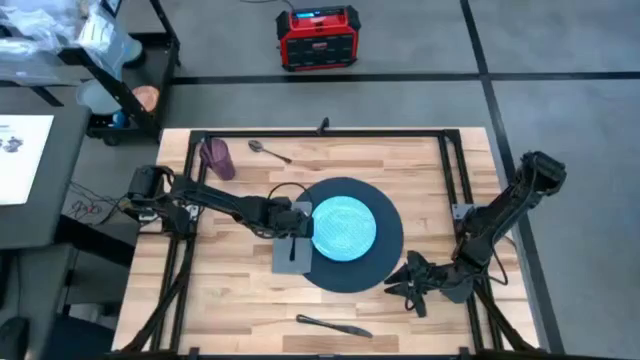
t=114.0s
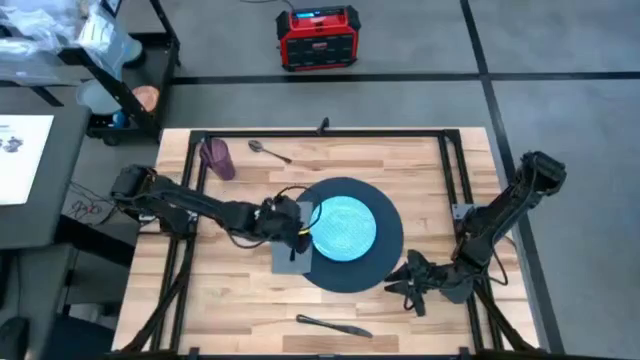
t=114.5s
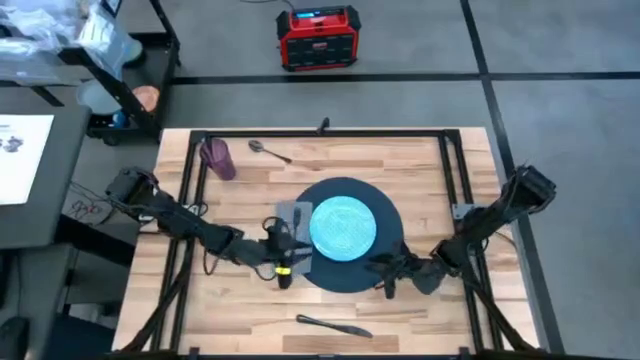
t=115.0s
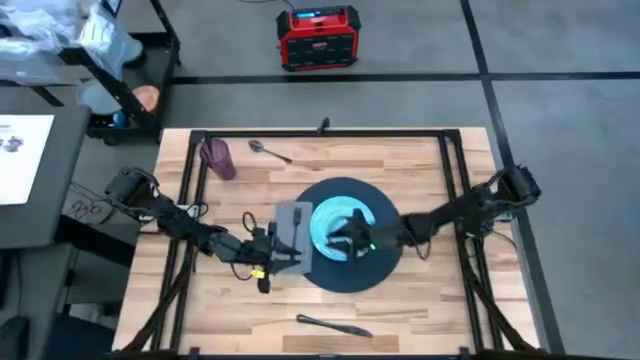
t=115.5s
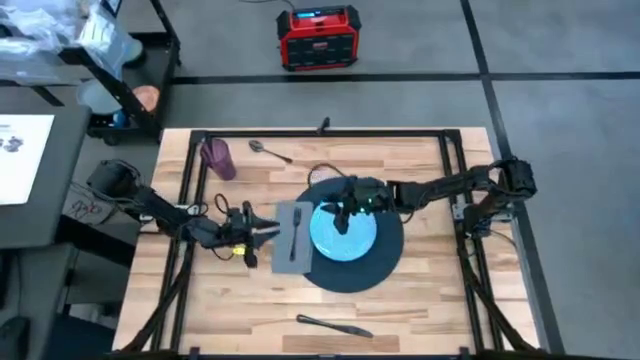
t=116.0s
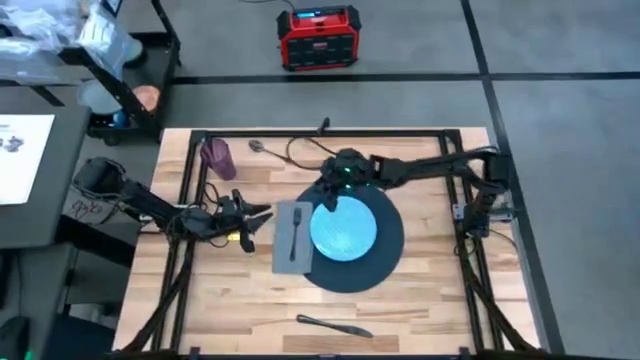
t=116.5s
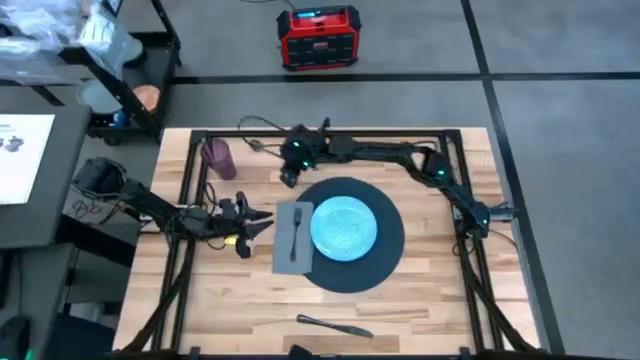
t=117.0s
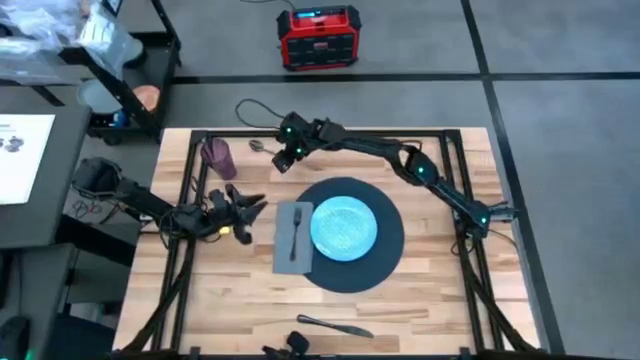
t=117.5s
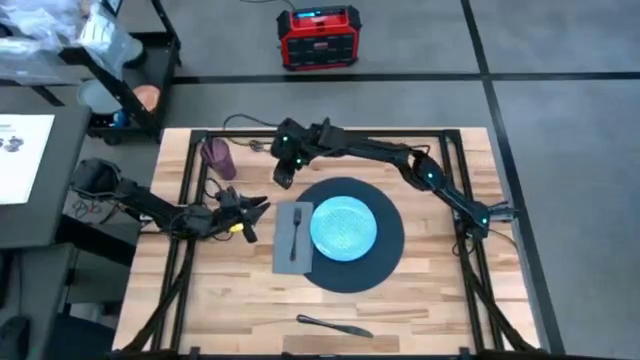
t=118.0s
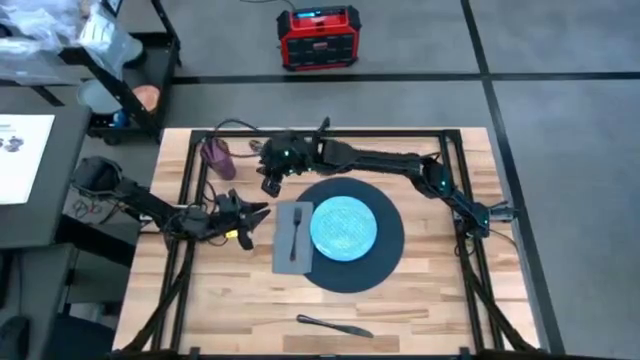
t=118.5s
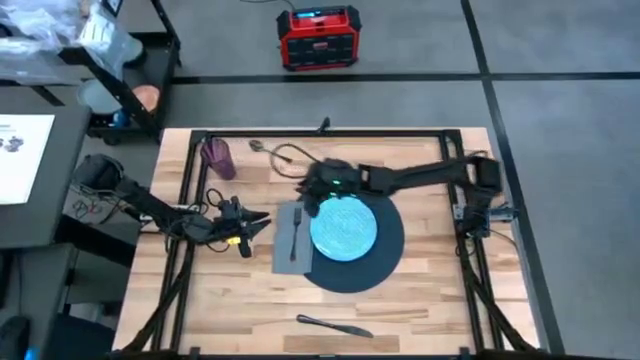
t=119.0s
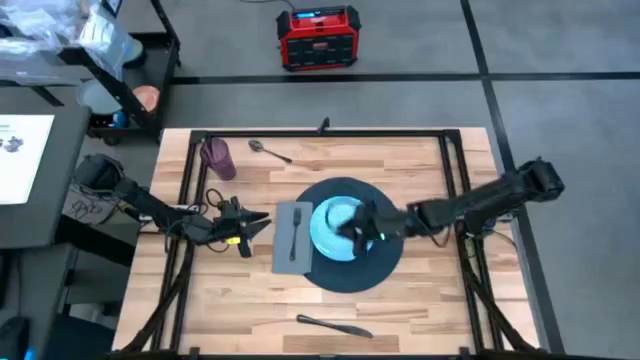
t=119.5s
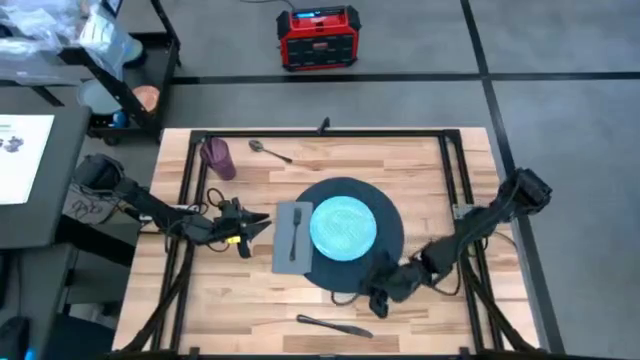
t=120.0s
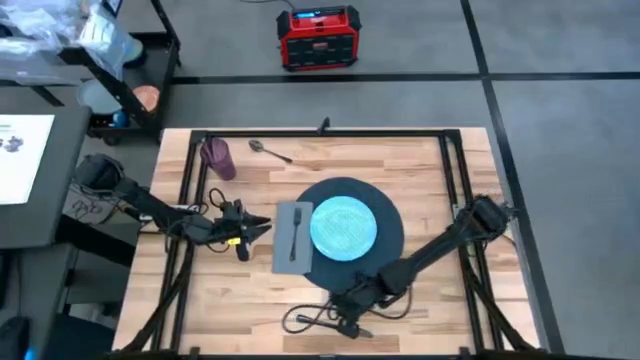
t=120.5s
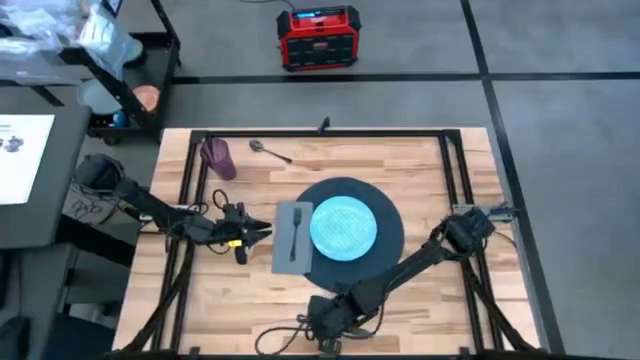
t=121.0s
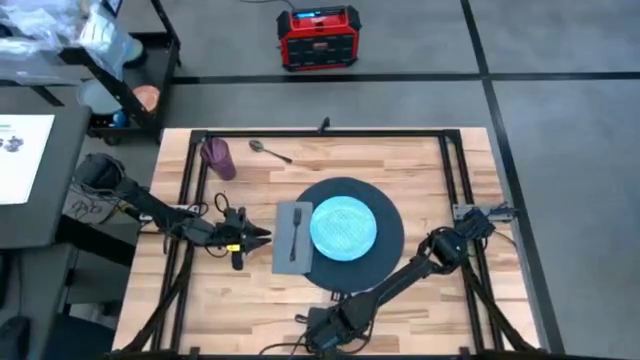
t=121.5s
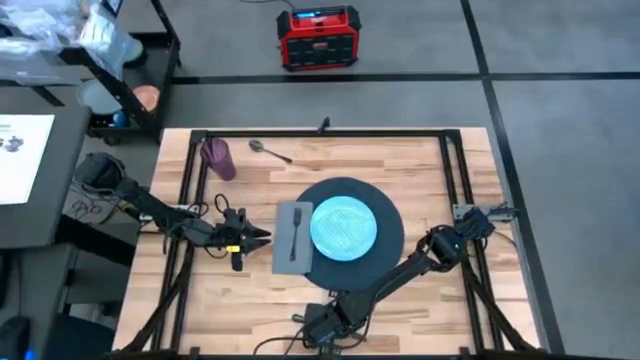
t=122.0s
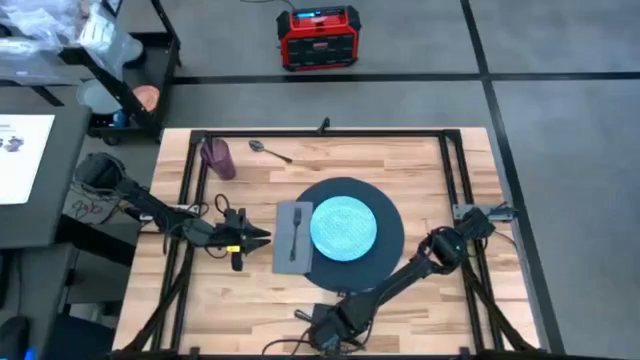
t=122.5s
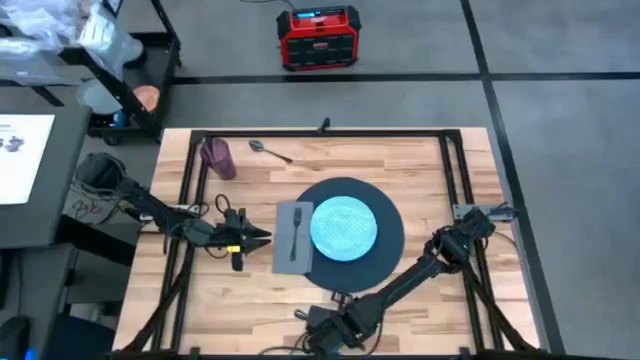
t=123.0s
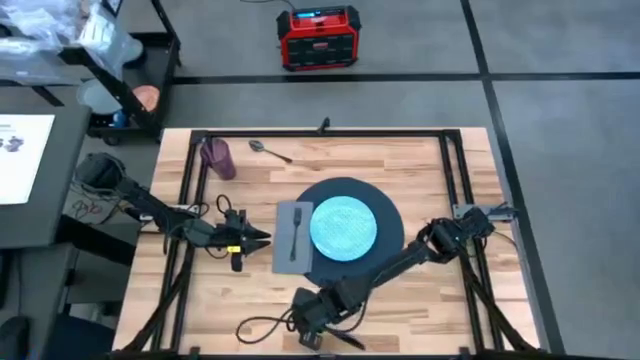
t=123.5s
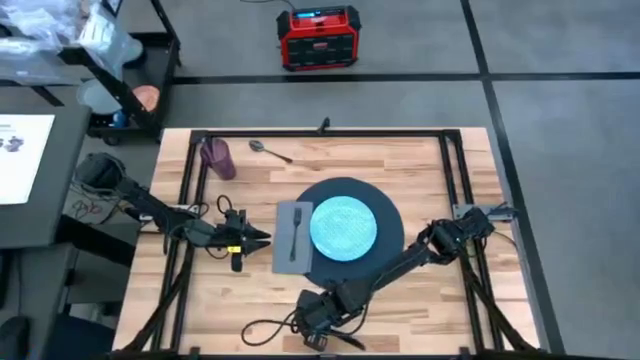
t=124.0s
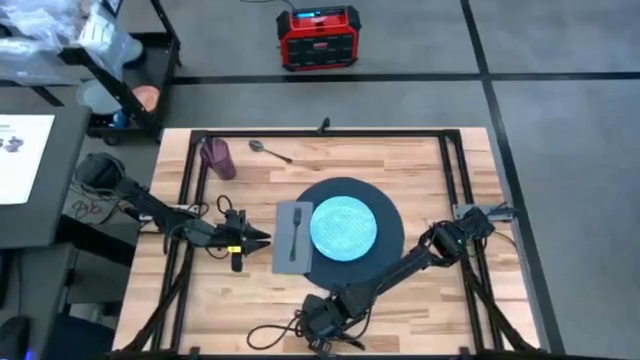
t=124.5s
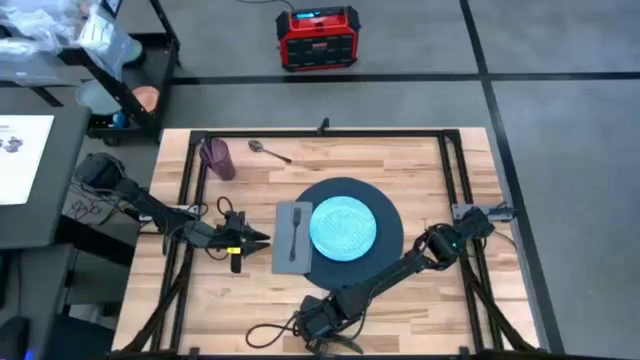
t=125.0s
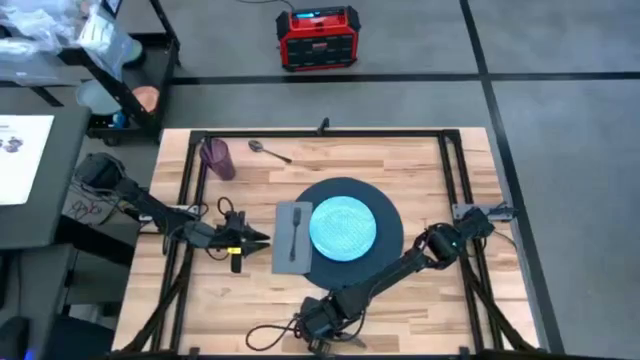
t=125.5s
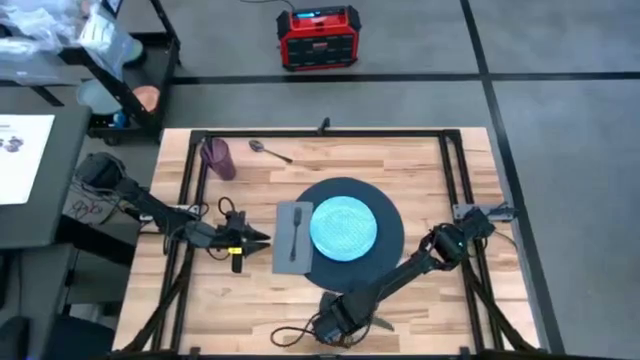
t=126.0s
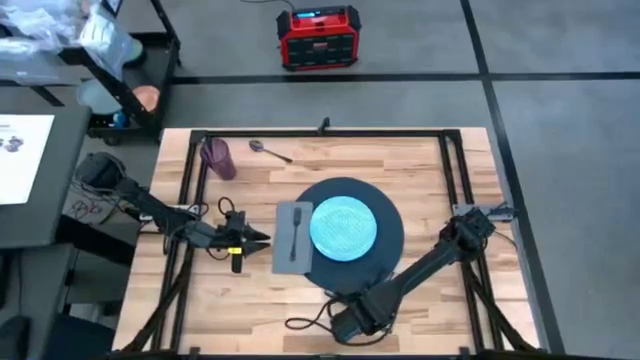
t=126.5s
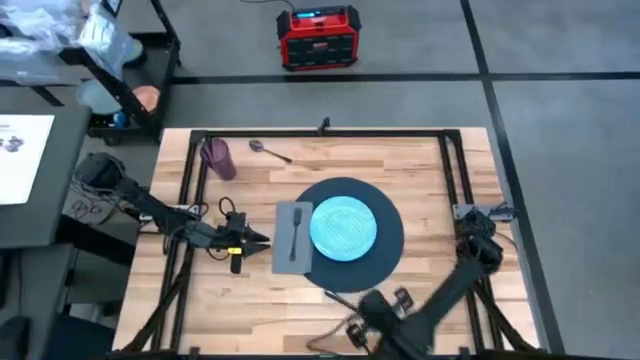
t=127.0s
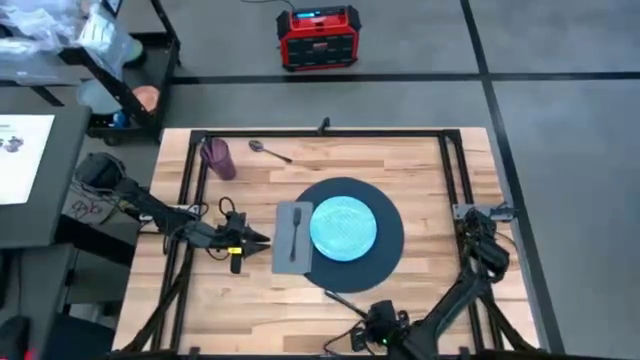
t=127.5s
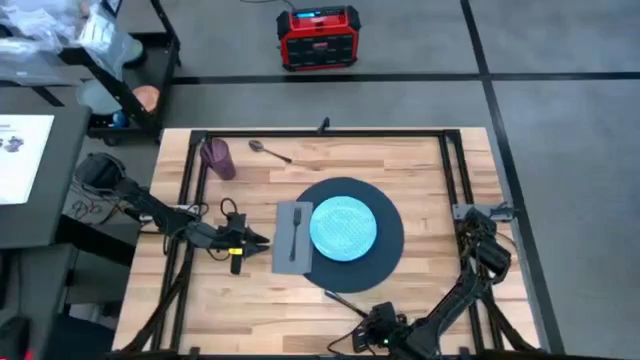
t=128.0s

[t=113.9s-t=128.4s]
Task: Set table place
Put the black knife on the dark blue table mat

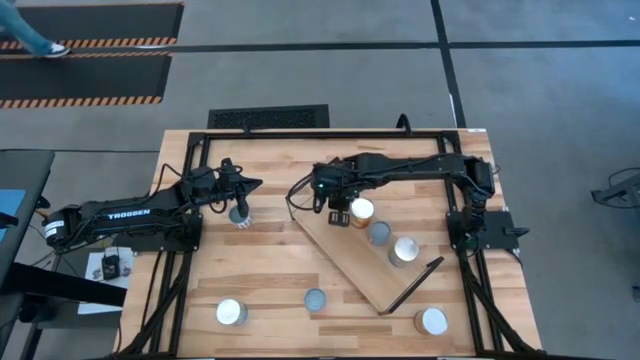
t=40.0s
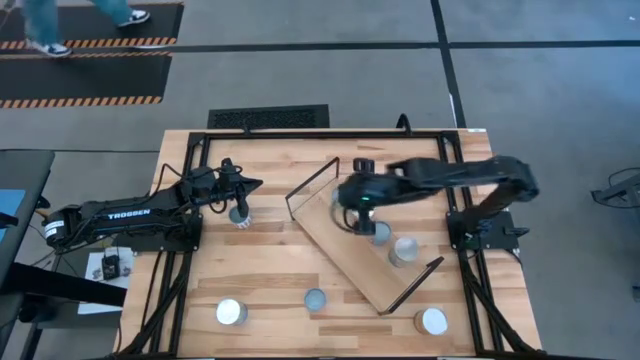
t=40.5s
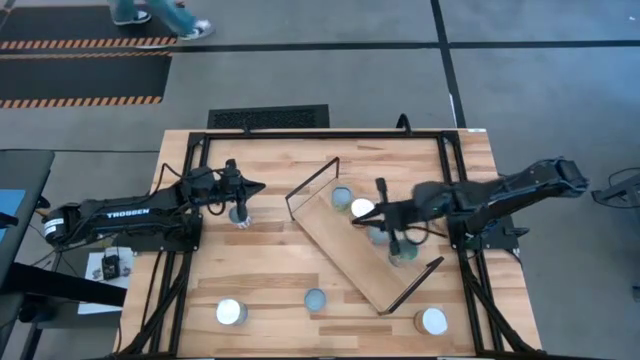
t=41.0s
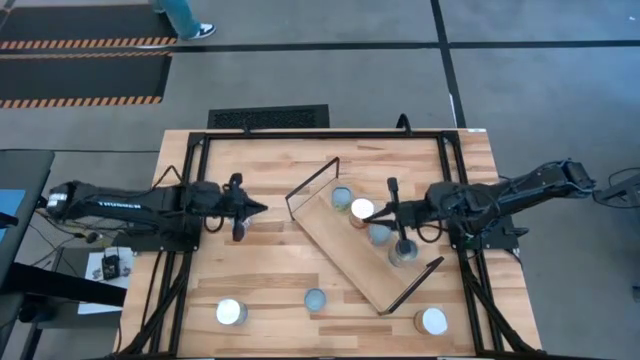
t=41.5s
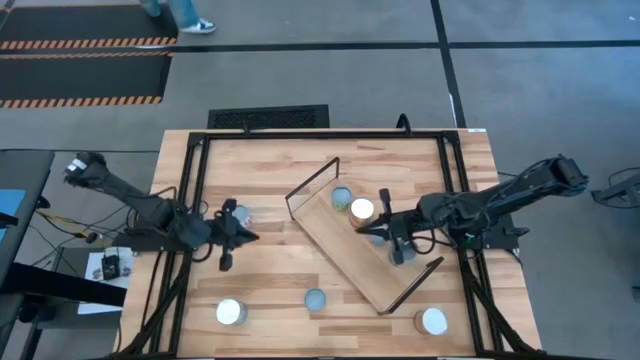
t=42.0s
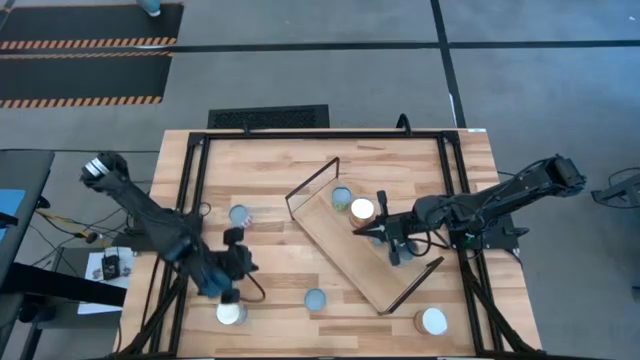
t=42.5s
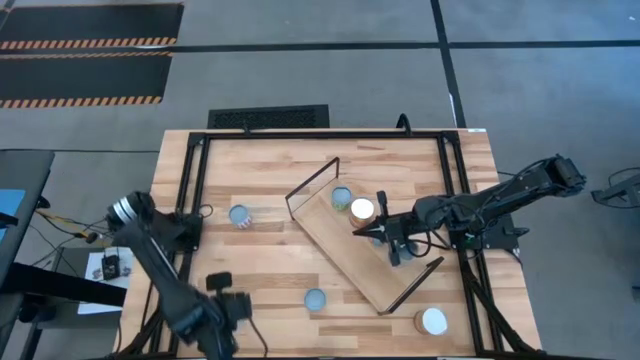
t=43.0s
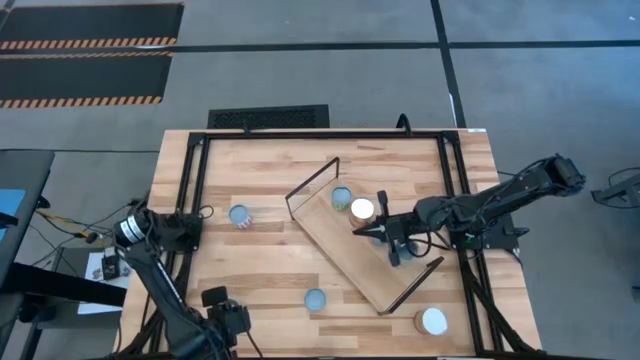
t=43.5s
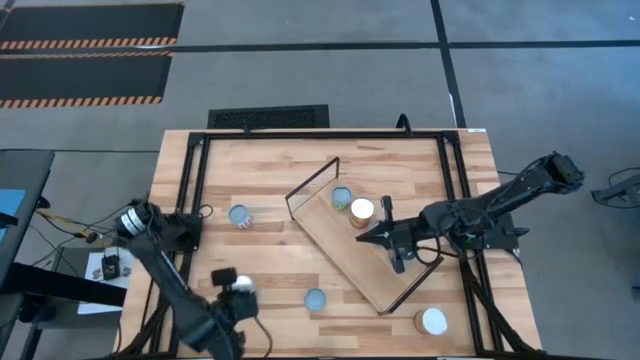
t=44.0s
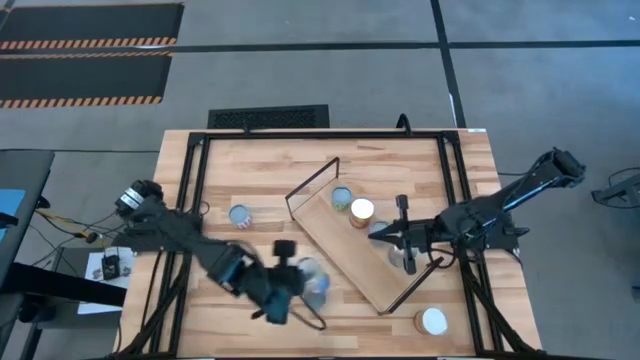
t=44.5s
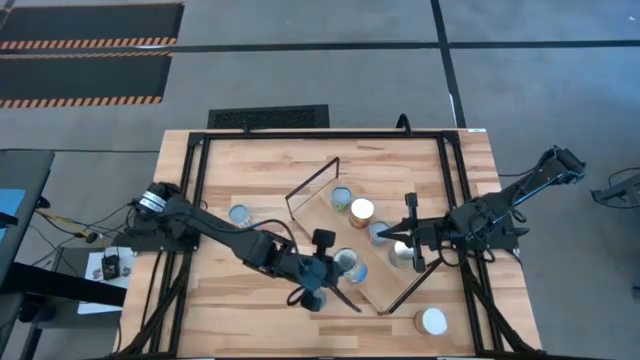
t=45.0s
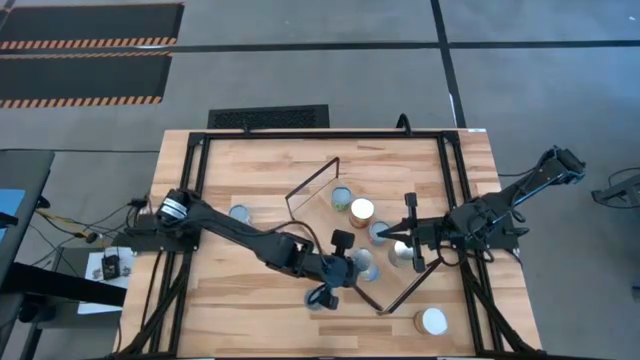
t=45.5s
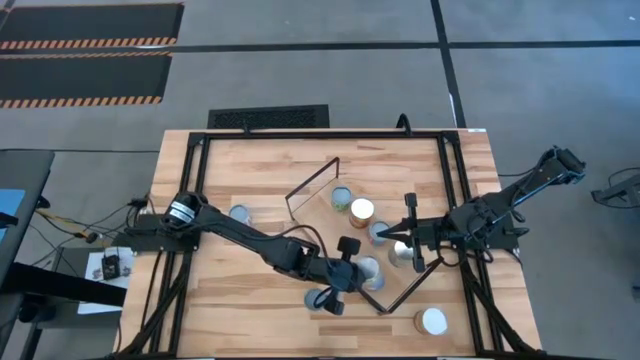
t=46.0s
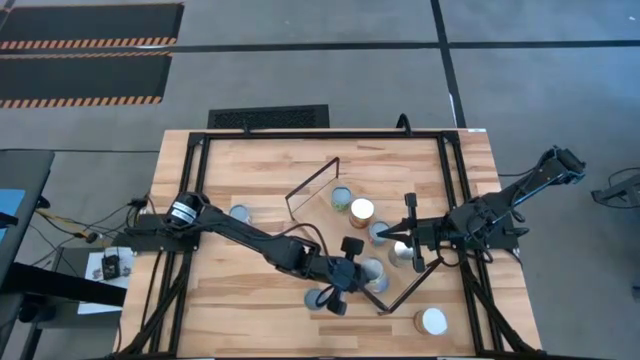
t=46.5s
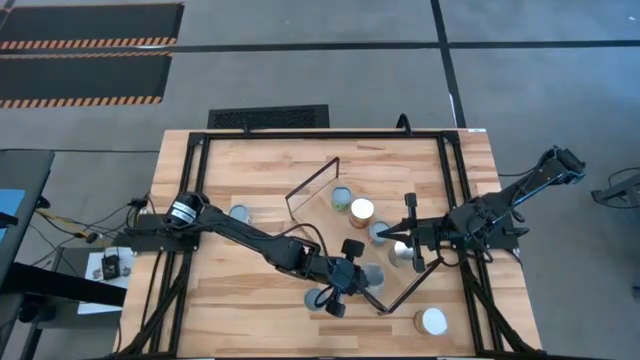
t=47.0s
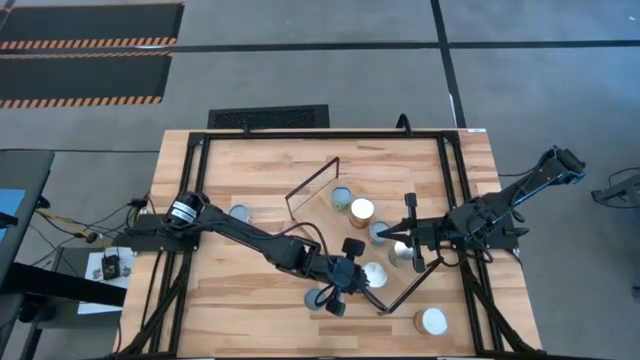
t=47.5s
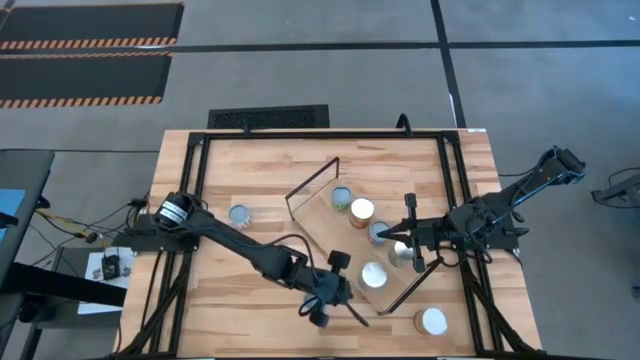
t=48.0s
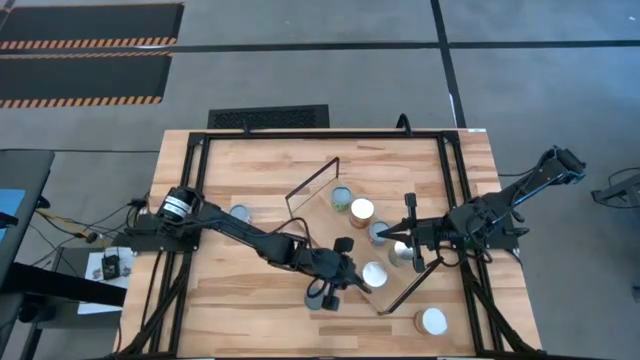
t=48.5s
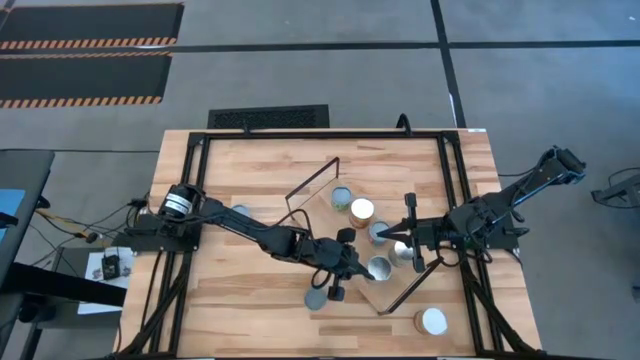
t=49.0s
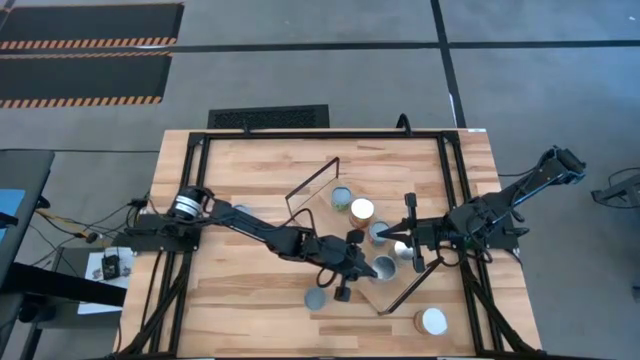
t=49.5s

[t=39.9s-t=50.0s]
Task: Pick and place cans onto a shelf
Put the large canned peaches aligned with the other large canned peaches on the shelf
